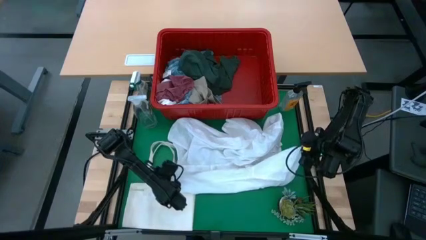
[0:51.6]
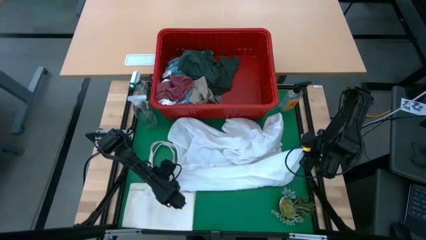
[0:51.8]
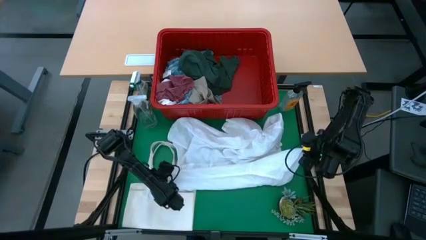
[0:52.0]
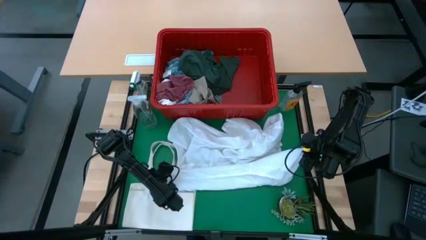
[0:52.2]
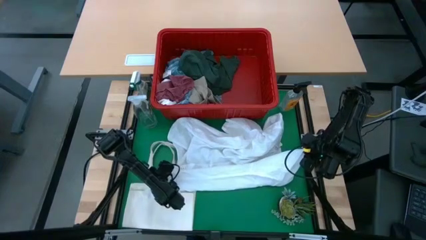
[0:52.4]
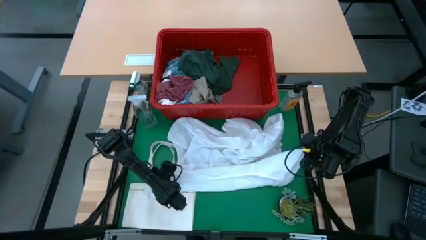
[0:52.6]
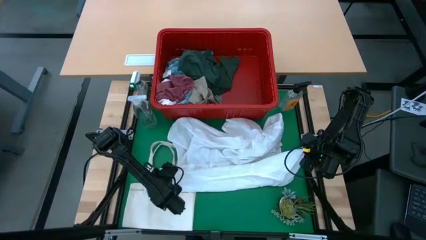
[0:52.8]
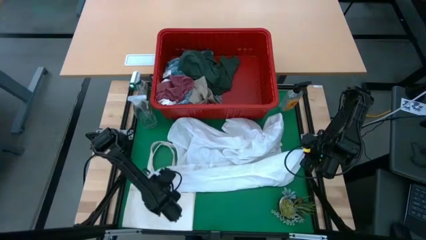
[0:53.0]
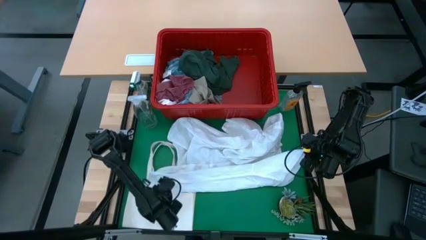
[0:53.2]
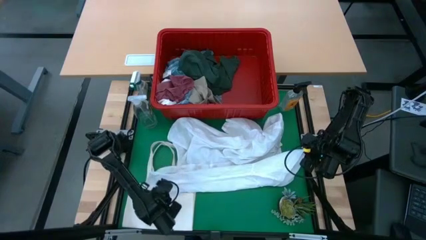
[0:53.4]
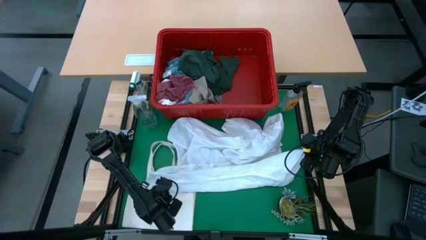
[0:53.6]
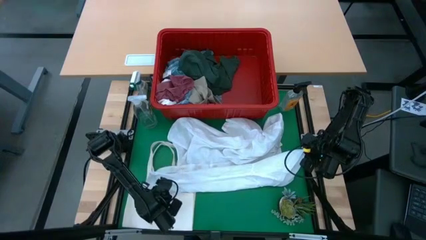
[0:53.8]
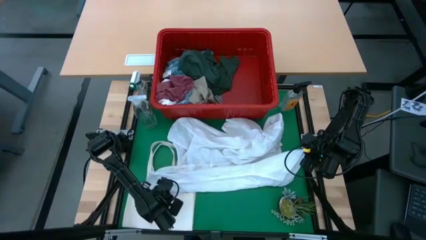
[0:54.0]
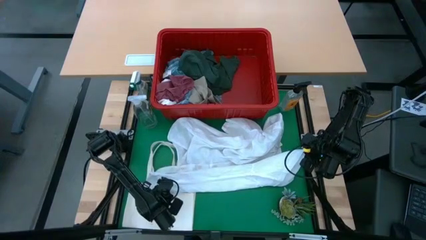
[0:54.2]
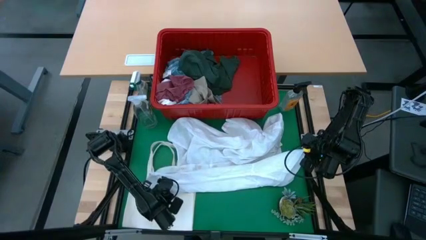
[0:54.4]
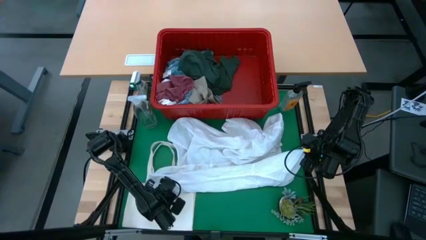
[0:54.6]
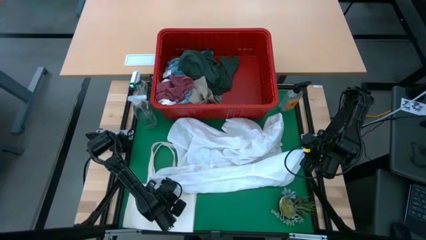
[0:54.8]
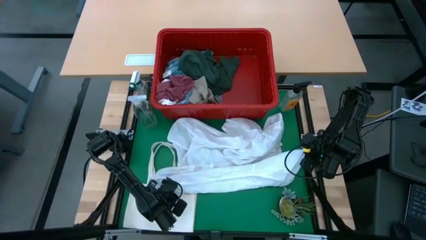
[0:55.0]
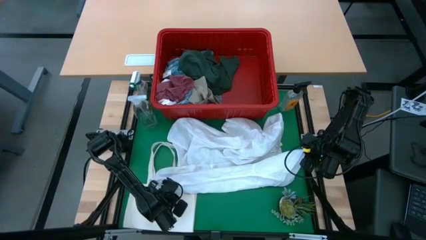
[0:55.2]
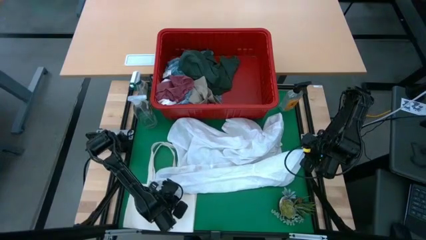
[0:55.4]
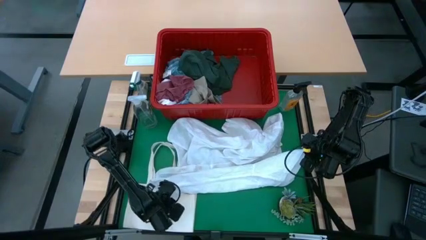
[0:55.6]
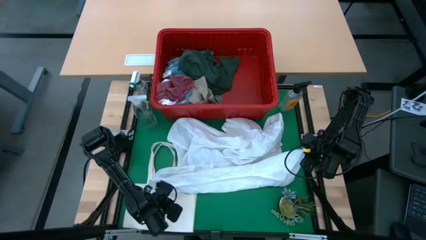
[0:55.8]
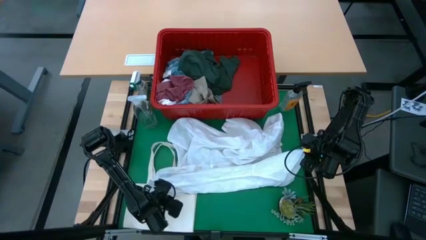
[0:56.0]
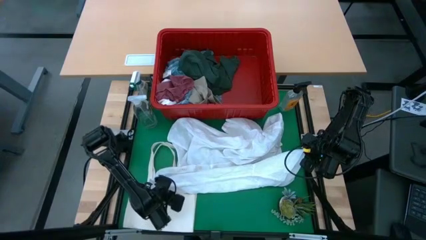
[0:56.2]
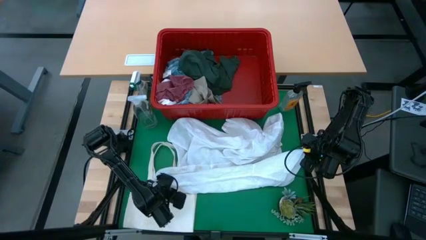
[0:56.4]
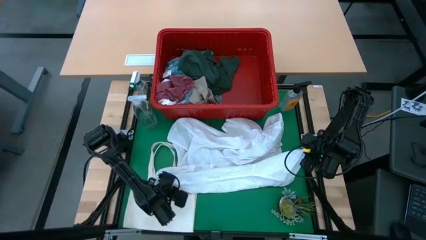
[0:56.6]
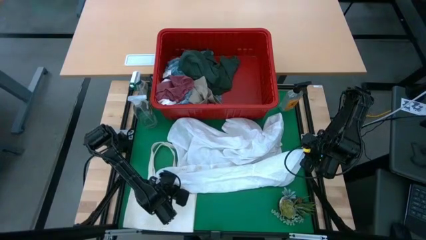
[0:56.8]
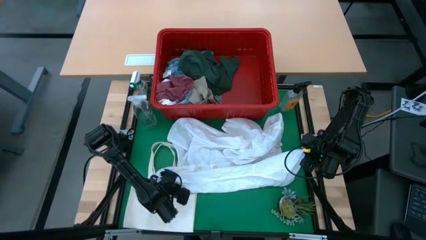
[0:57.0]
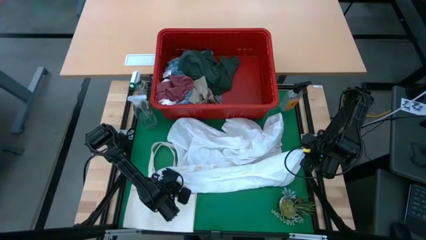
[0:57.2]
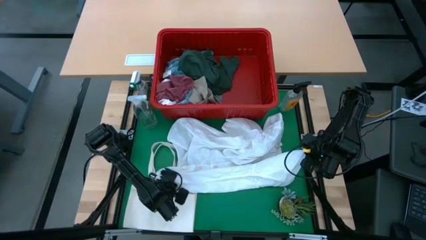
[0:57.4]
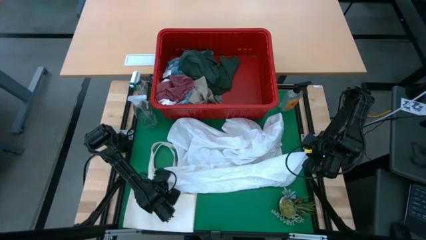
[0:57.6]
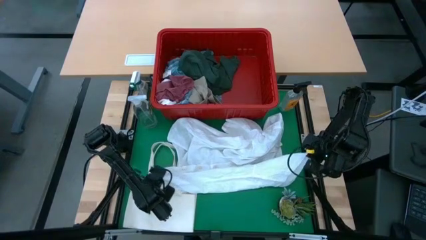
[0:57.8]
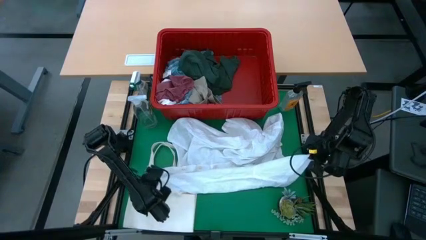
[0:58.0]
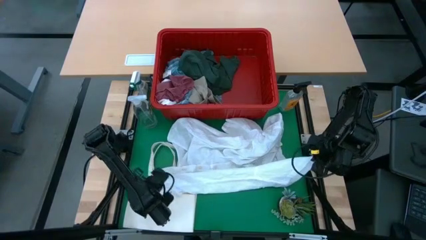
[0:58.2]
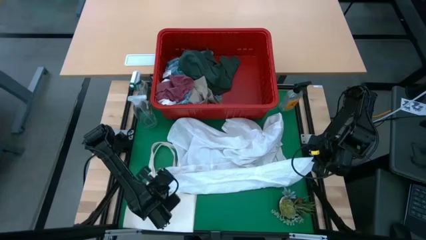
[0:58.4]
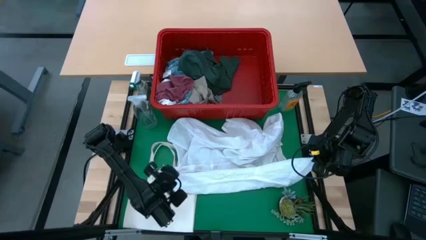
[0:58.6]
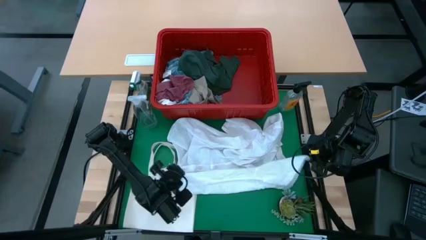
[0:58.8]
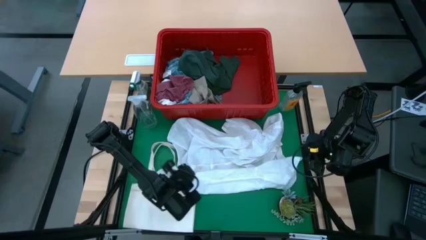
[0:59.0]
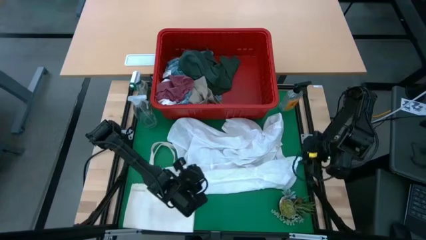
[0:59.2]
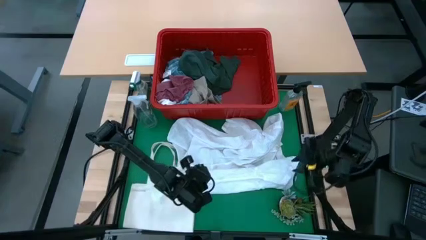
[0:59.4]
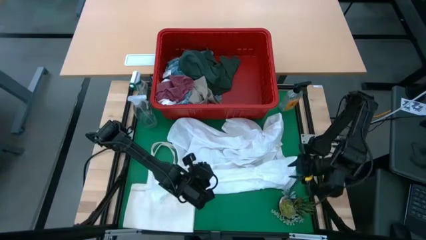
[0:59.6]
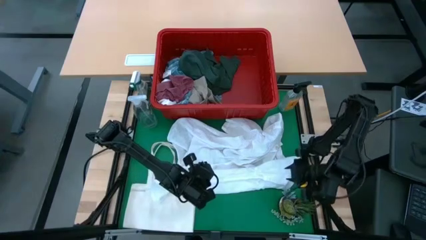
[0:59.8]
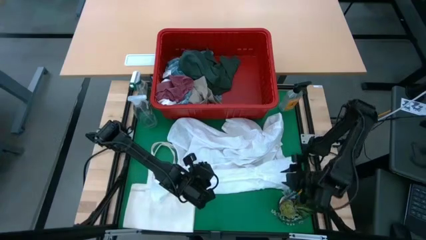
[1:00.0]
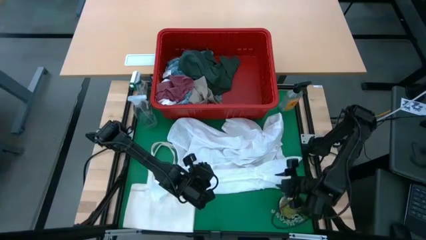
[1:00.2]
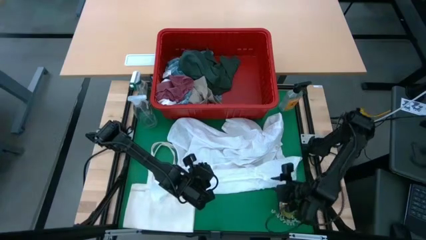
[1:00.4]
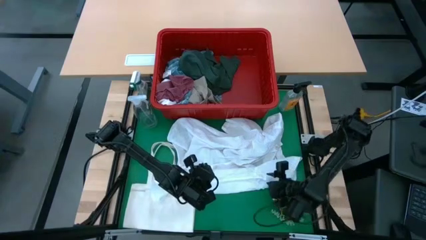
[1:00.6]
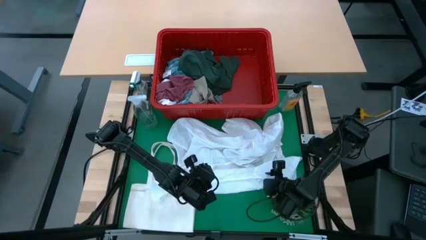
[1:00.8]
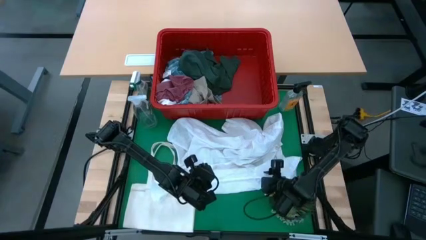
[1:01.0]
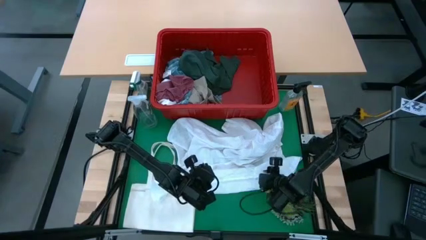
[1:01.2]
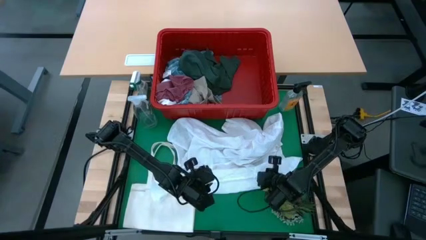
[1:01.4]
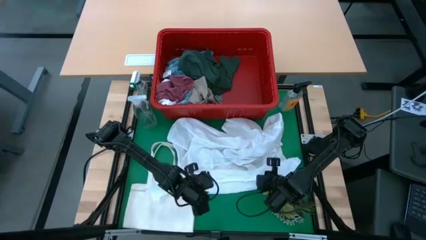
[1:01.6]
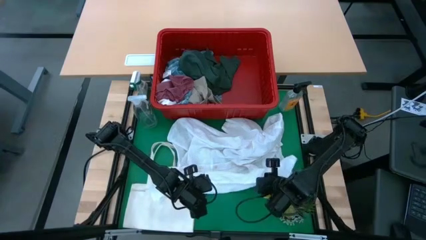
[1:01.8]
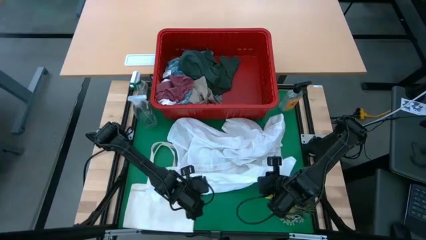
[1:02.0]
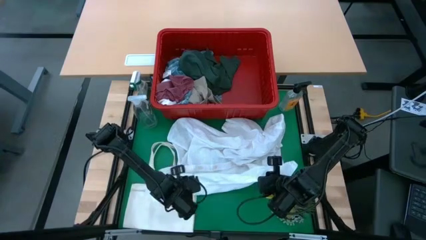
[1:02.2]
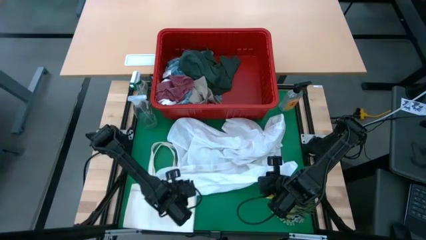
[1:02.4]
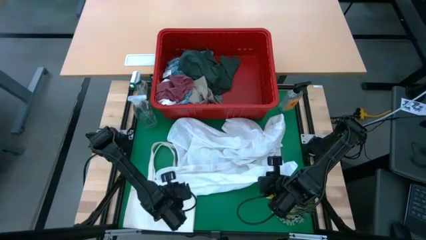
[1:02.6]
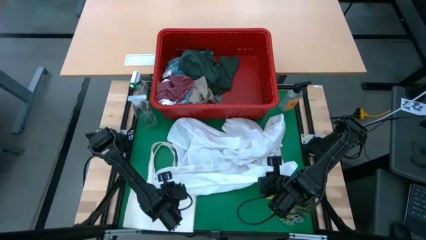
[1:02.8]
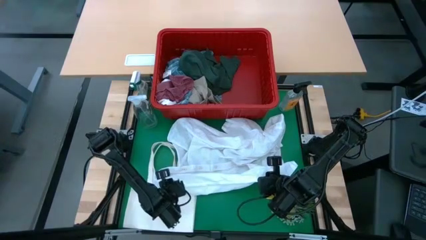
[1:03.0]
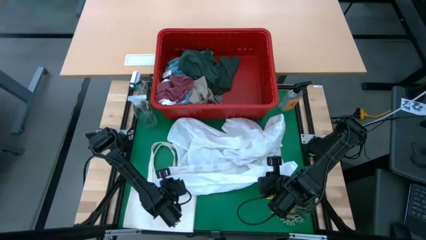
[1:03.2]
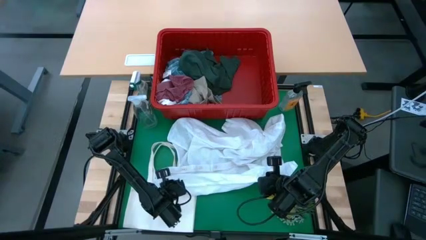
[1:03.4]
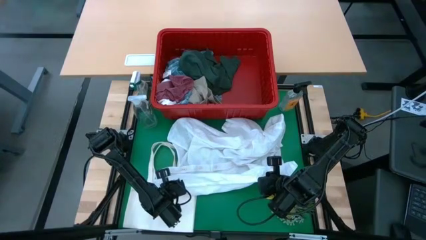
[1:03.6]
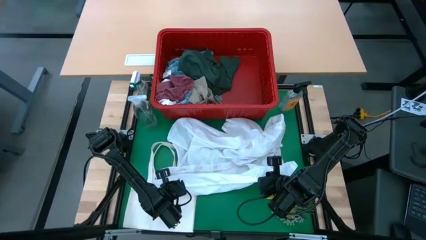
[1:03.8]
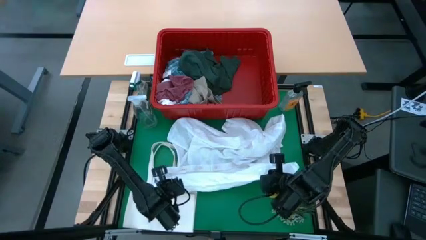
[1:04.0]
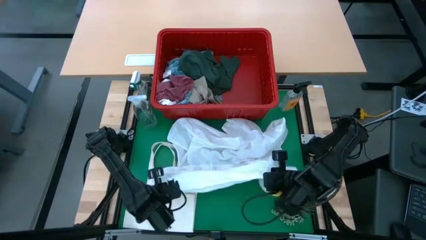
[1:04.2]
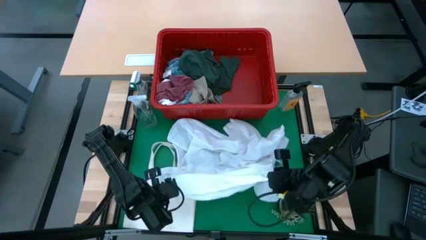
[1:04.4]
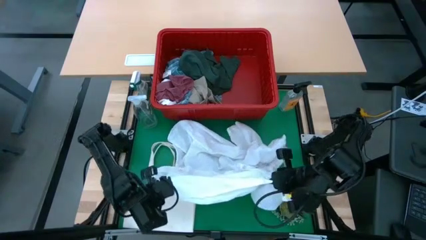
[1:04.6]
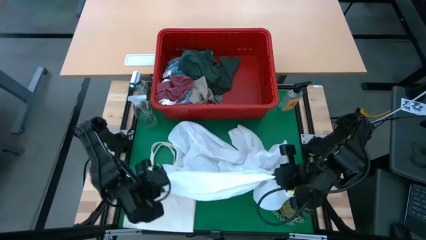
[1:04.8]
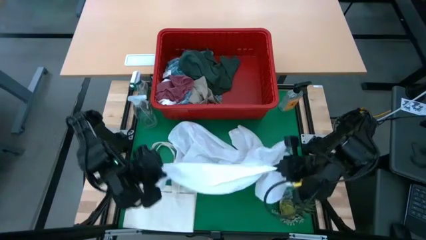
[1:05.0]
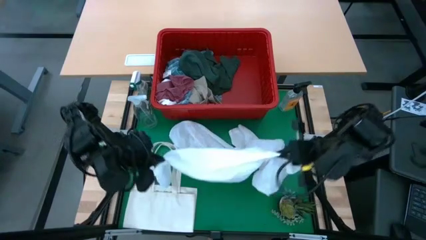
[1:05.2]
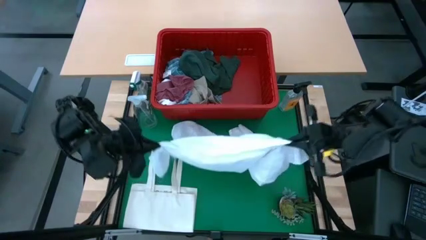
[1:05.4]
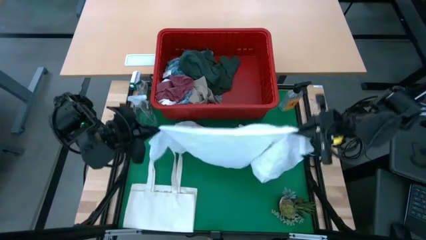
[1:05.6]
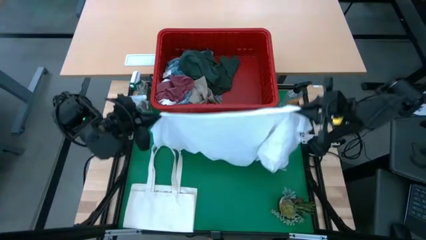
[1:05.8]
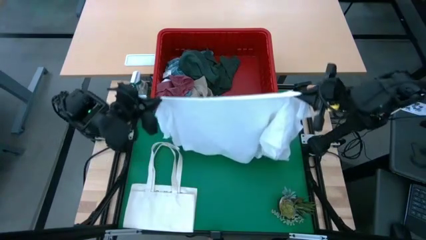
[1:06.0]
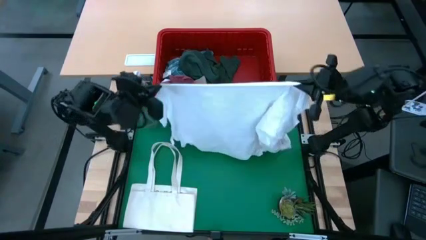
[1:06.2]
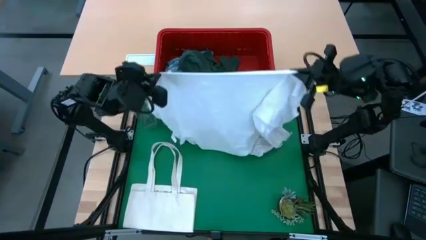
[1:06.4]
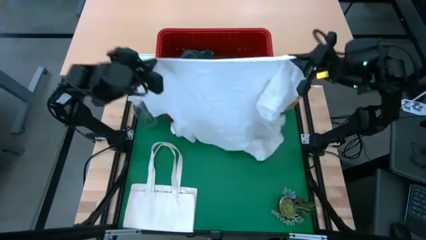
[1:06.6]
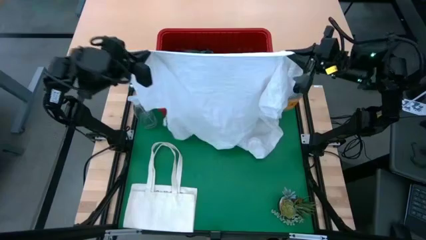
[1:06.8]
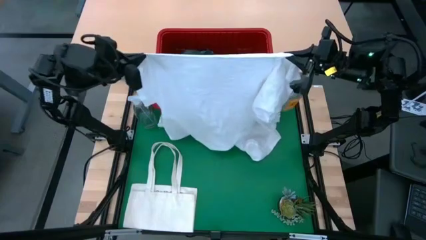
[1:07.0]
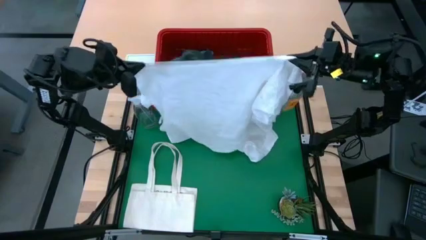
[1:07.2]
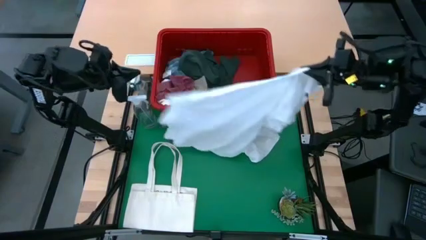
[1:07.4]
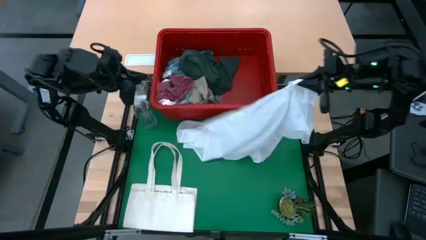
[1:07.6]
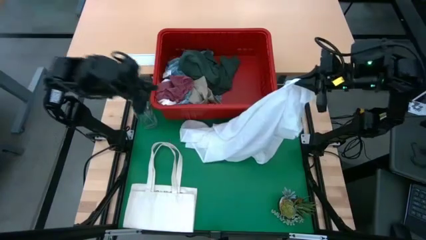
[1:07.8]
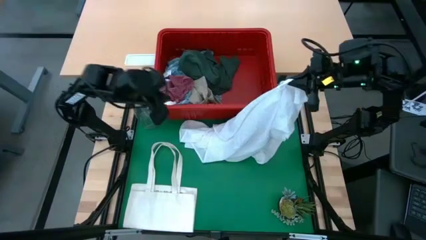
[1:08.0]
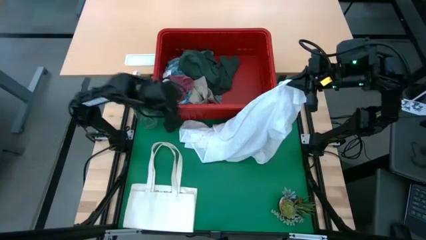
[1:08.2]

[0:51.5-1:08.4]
Task: Fold Laundry from Bin
Fold the white polo shirt
